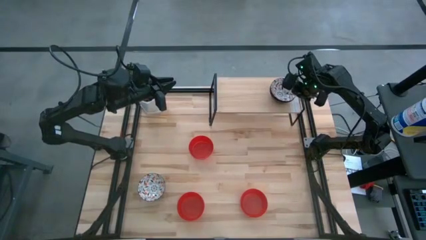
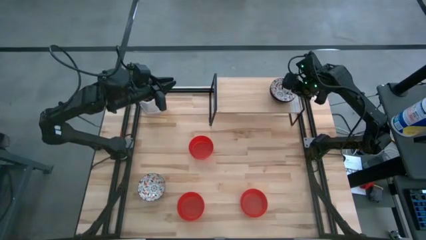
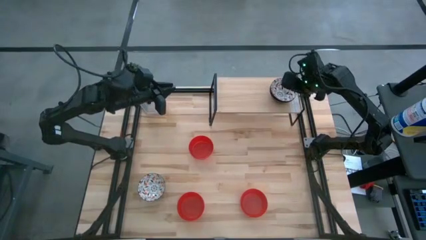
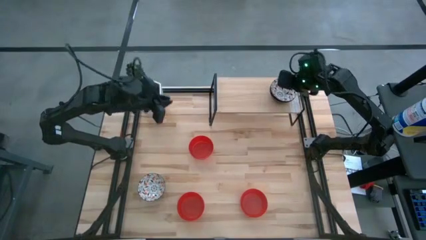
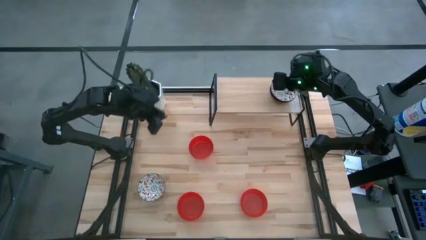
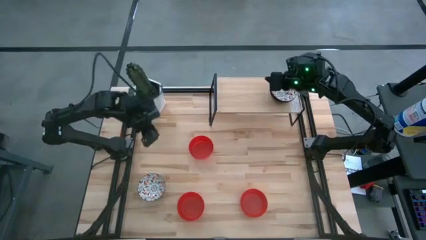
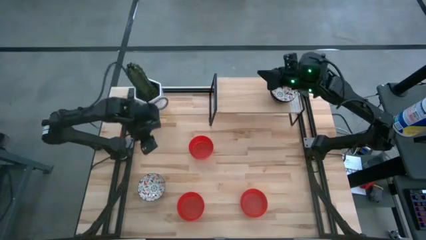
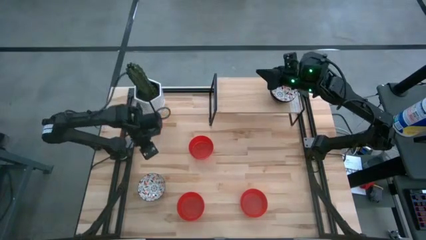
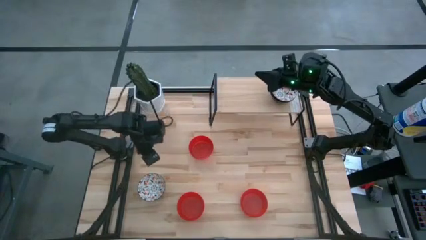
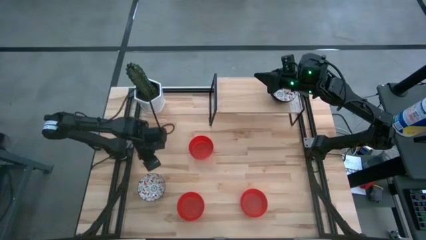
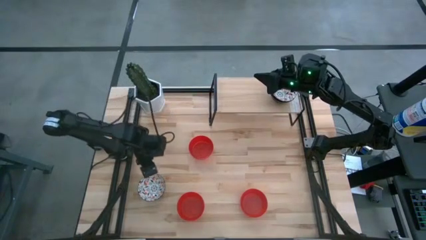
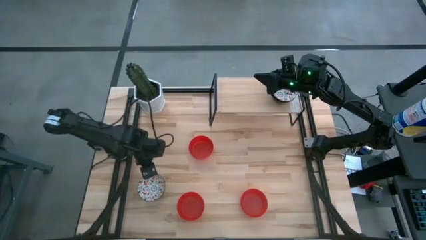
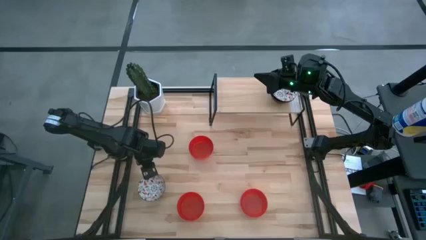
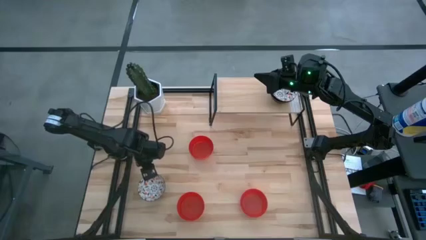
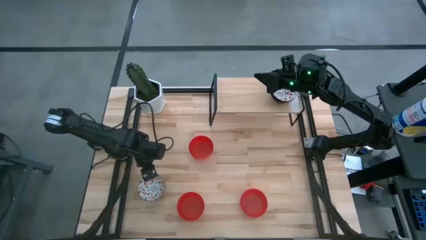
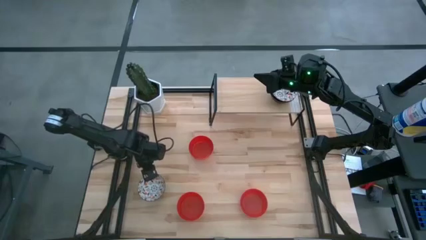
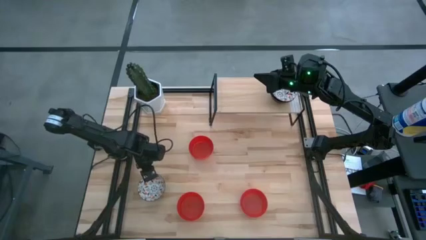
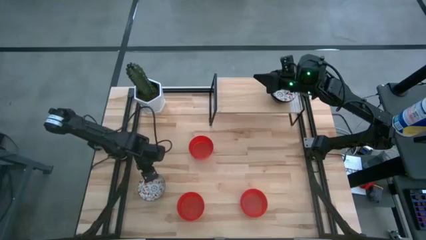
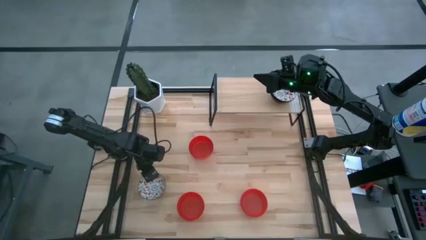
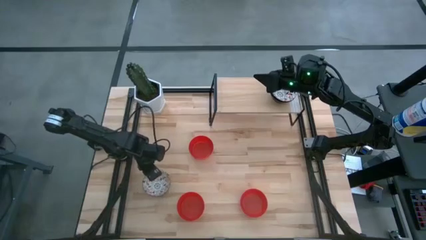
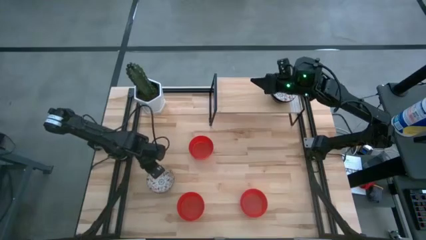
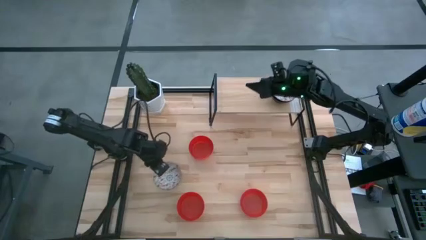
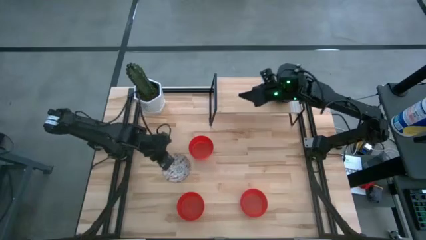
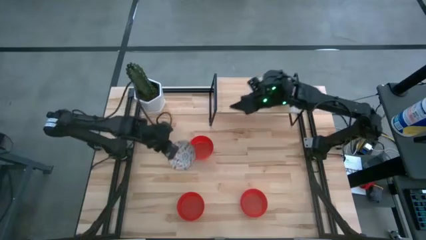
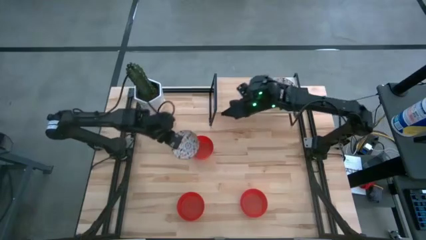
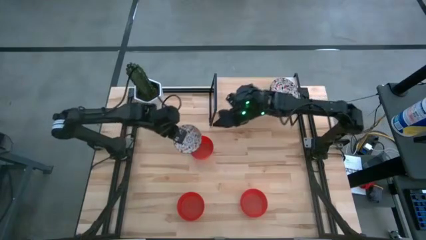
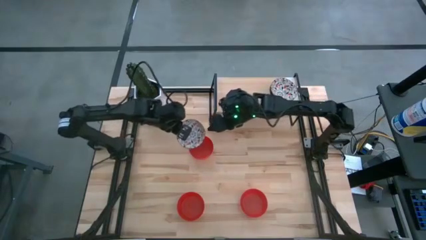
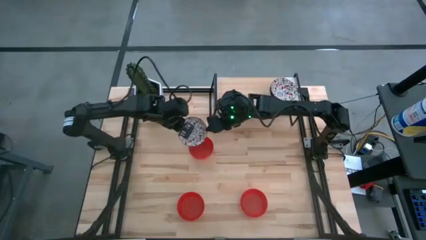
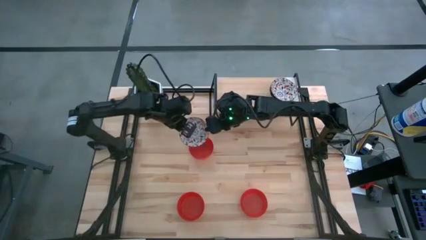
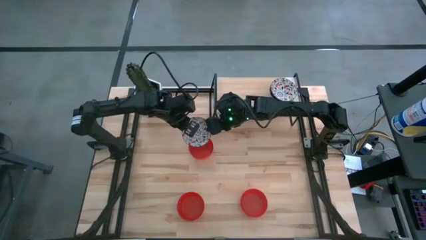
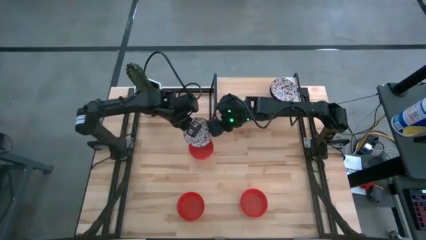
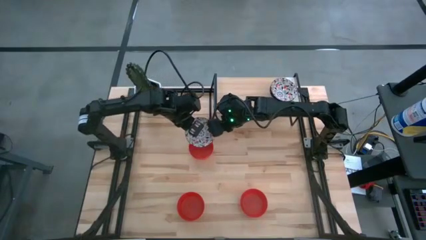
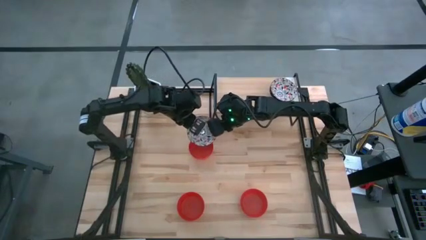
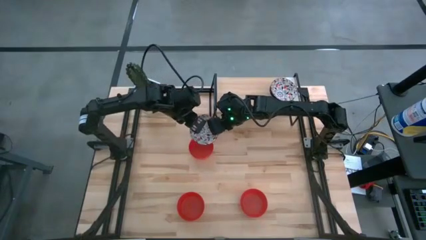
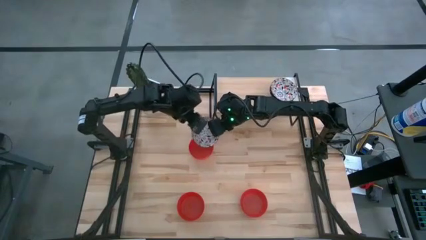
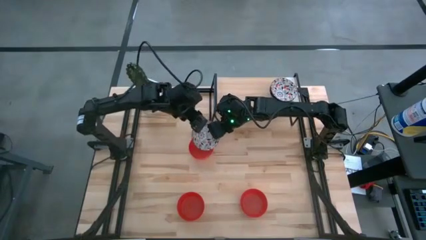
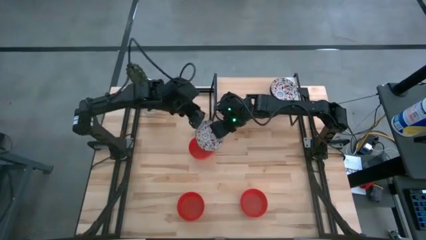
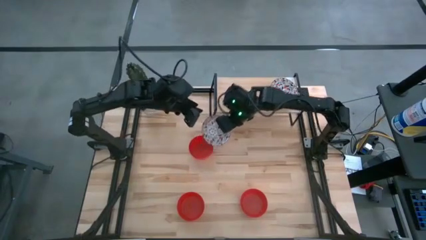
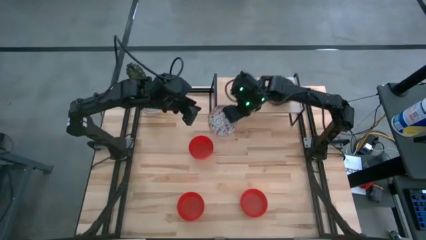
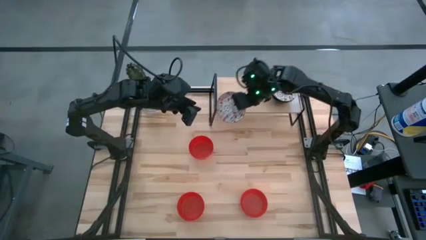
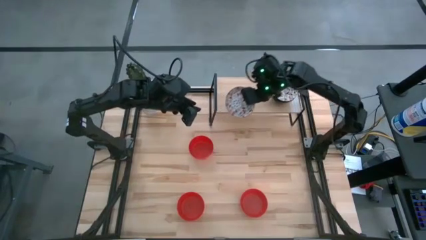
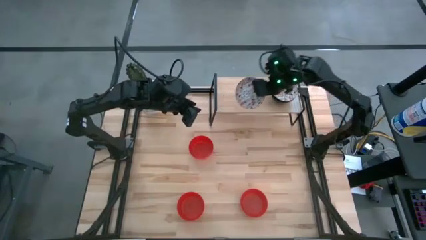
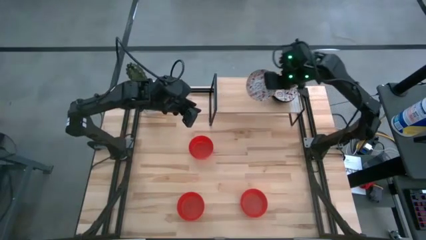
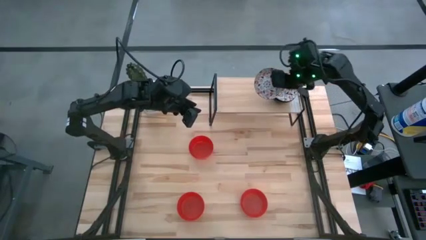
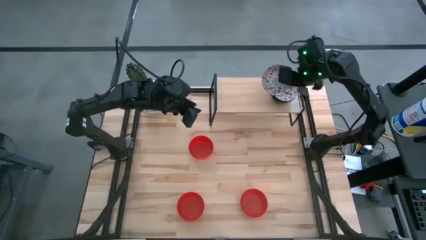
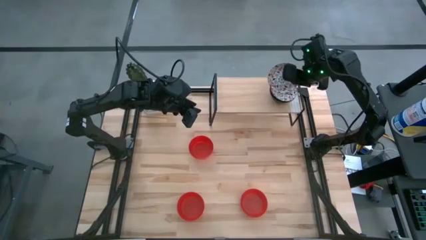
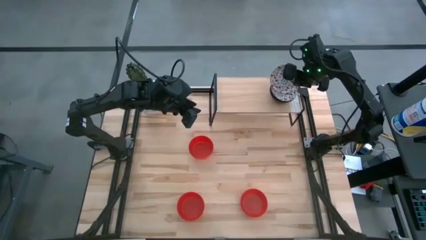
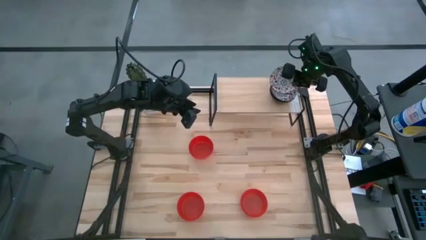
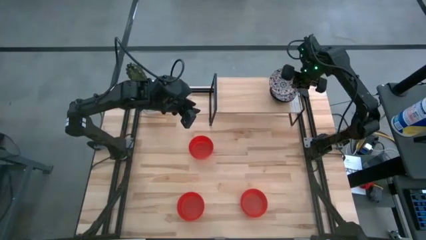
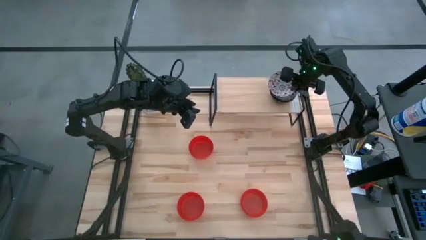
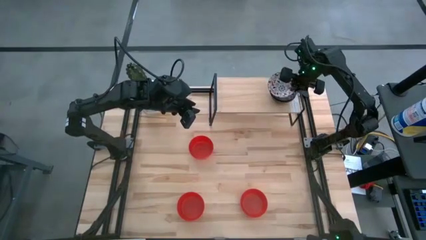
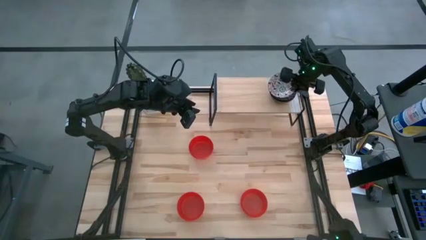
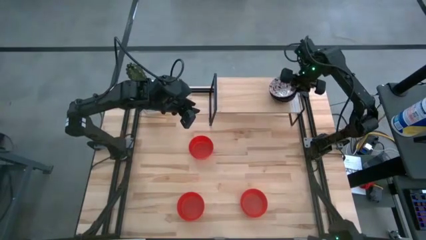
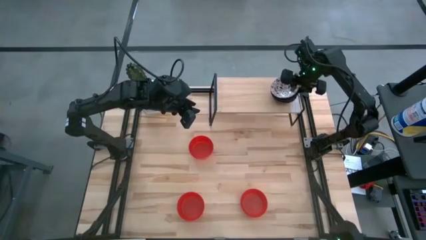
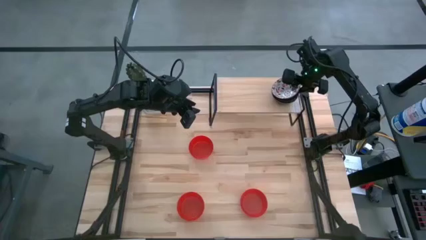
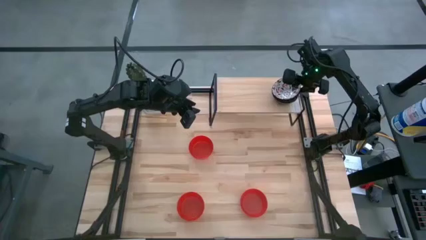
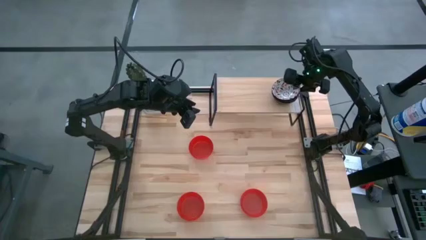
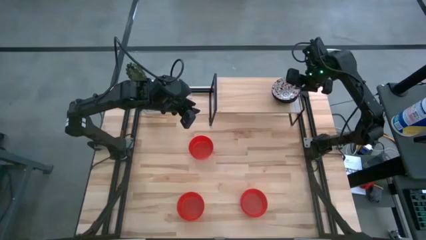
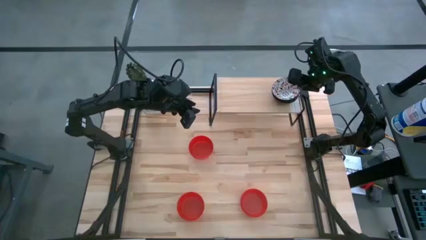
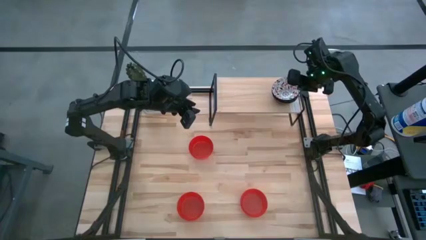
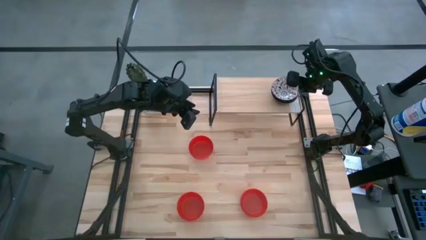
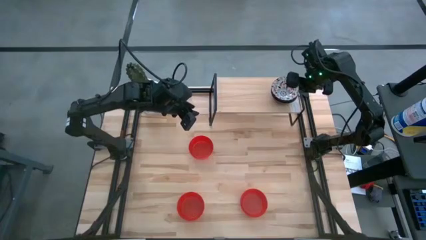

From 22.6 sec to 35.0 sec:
Task: Pick & Place Mini bowls
Stack the white bowl on the white bowl on the shelf
